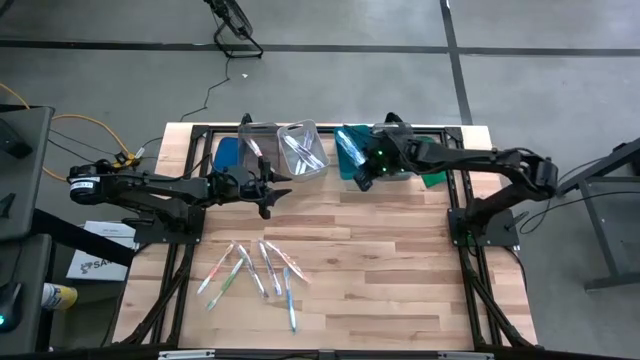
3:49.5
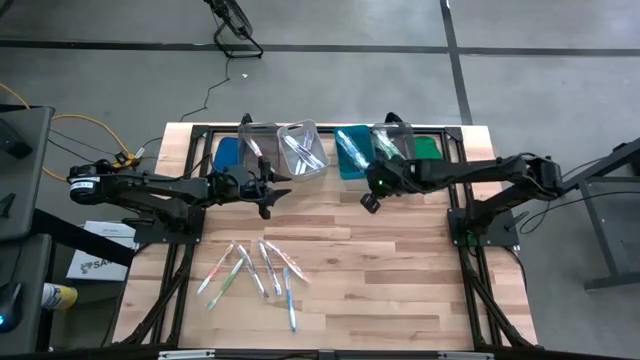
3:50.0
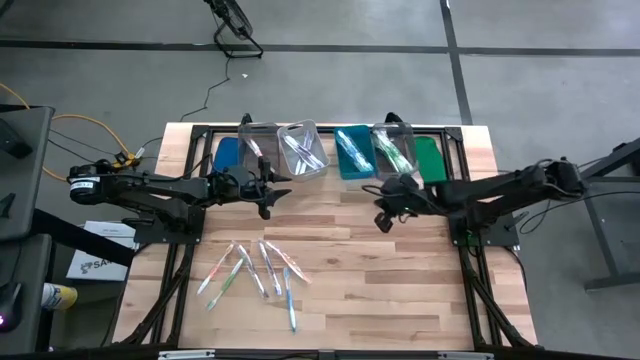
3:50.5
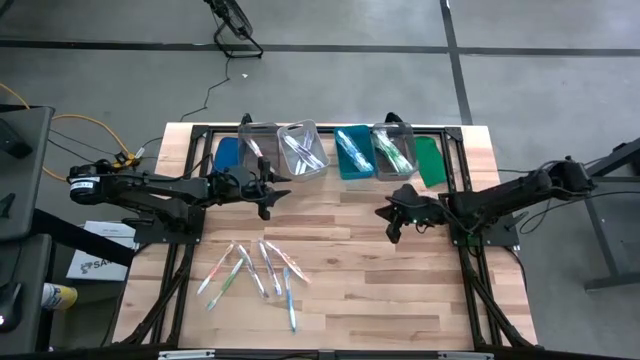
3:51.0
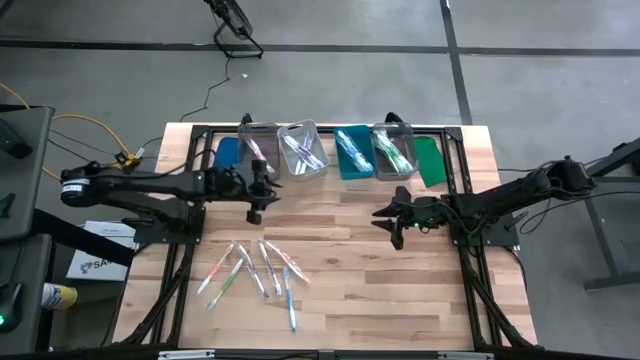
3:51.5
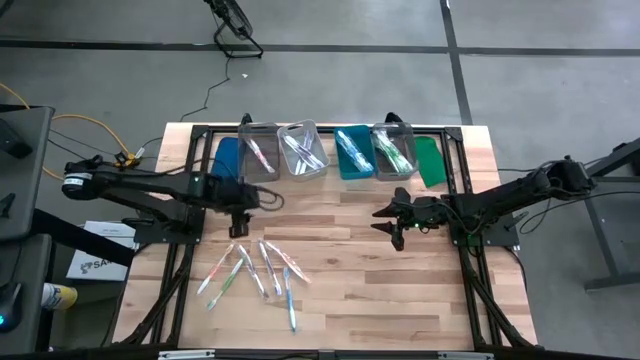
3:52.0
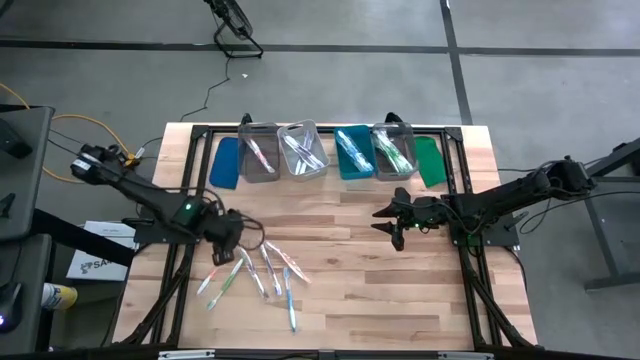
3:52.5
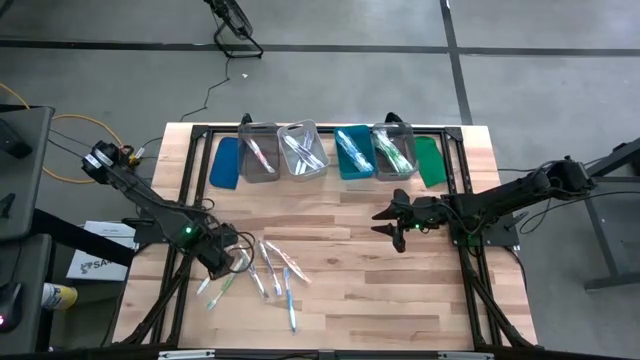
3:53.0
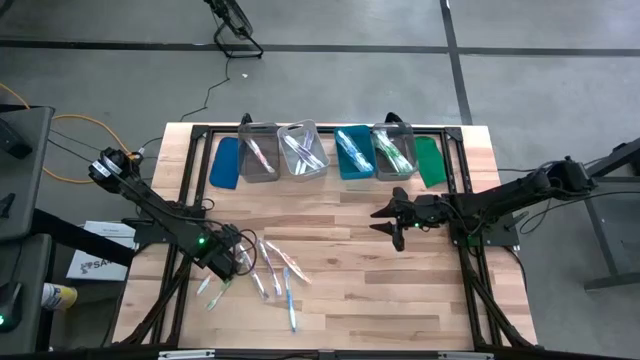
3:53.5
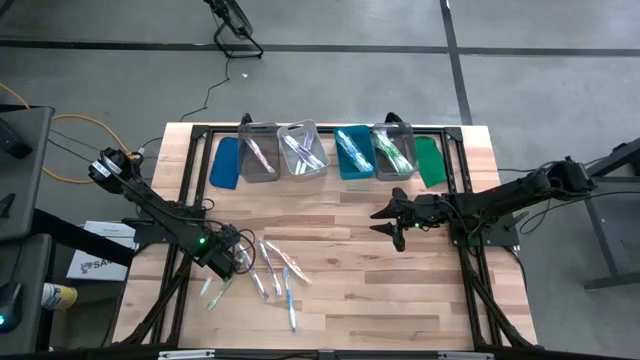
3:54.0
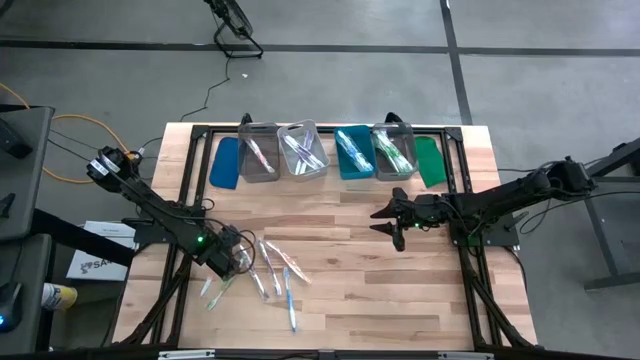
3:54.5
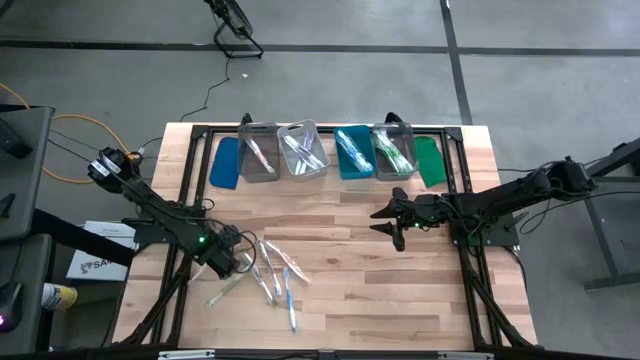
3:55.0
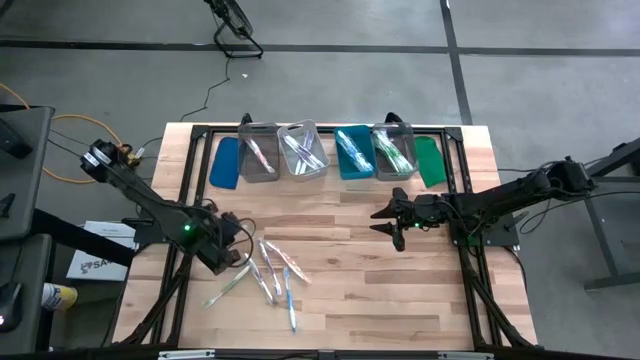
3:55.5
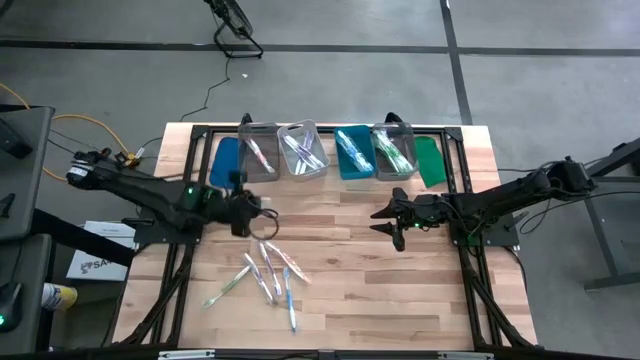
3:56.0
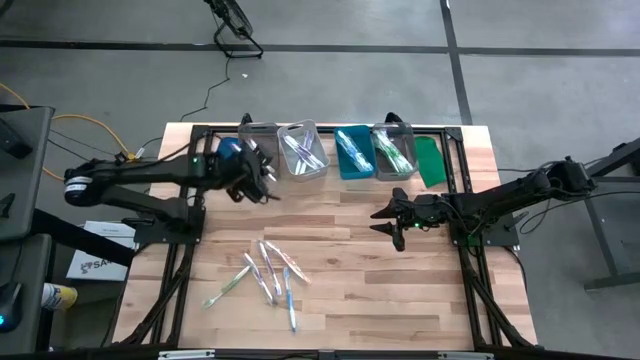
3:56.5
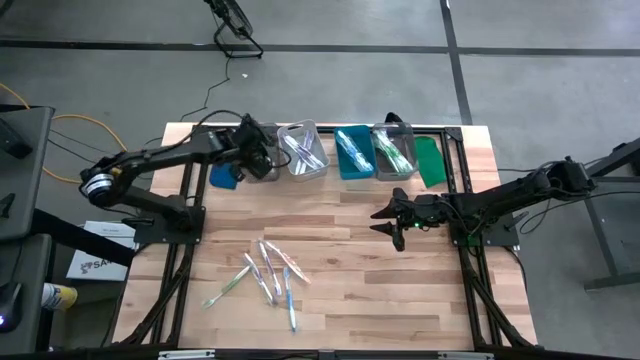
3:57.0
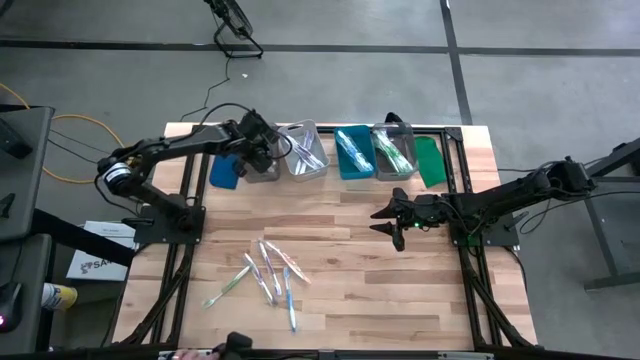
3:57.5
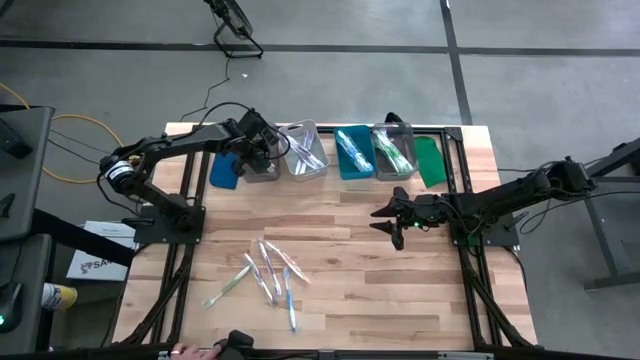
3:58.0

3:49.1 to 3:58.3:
Task: Pick & Place Toothbrushes
Put the orange toothbrush into the left black bin

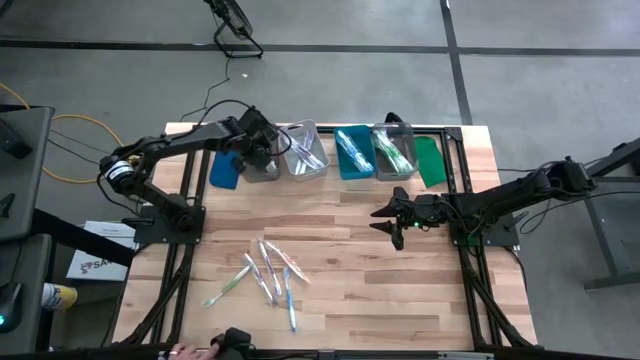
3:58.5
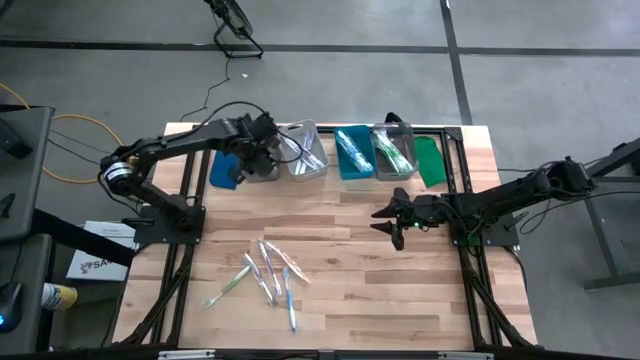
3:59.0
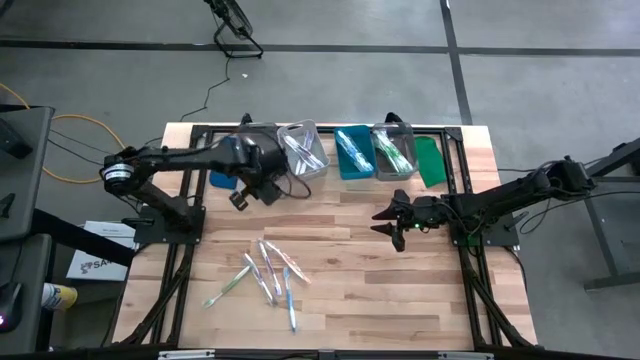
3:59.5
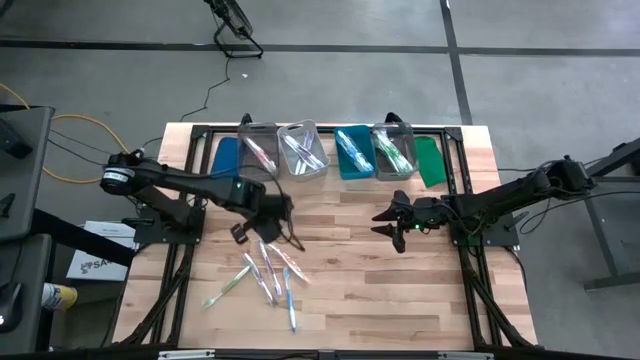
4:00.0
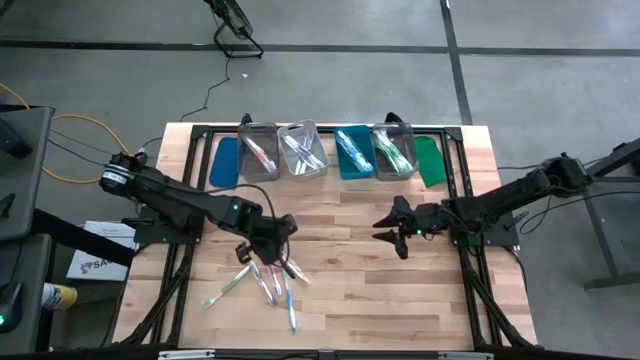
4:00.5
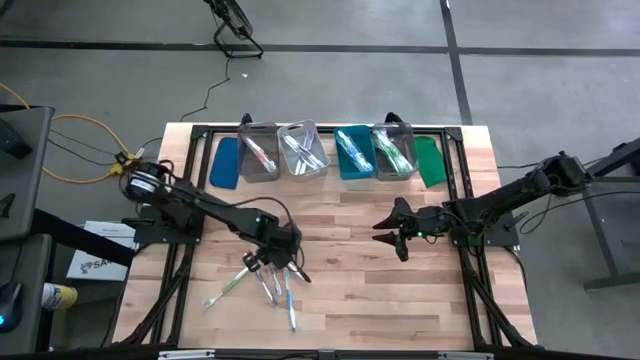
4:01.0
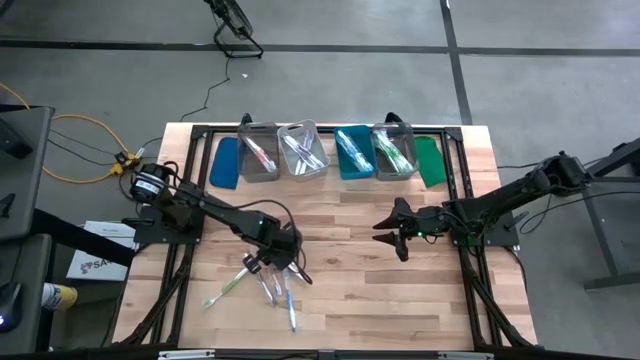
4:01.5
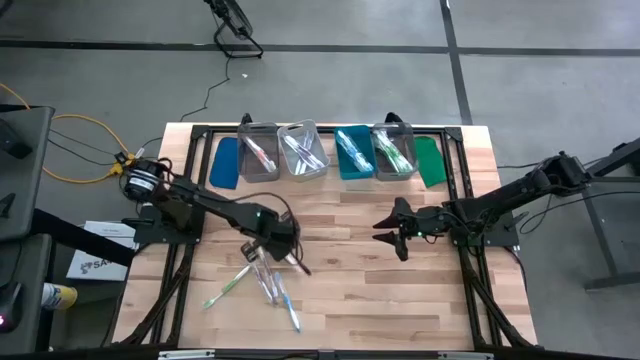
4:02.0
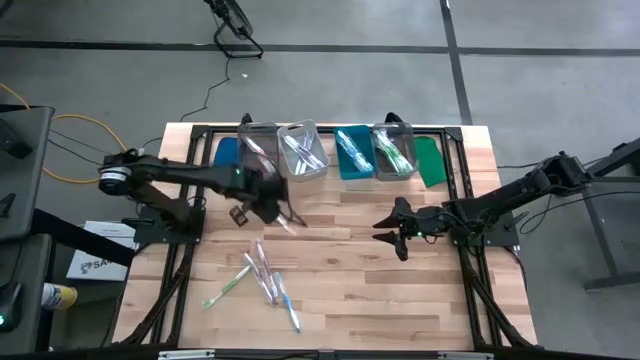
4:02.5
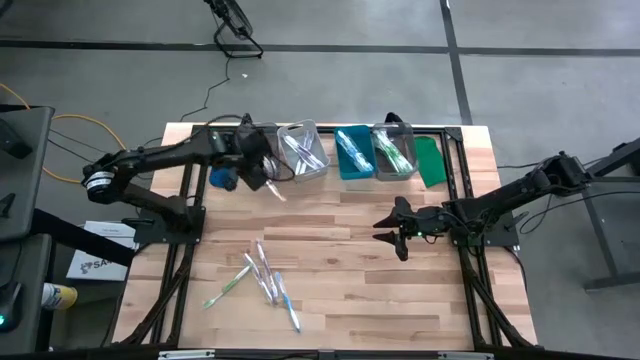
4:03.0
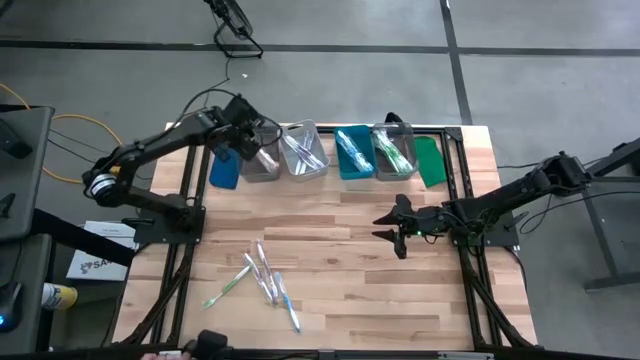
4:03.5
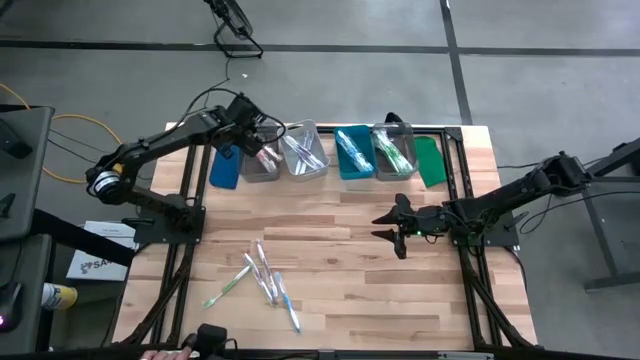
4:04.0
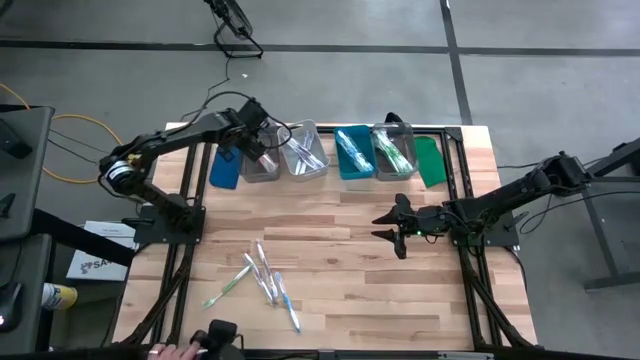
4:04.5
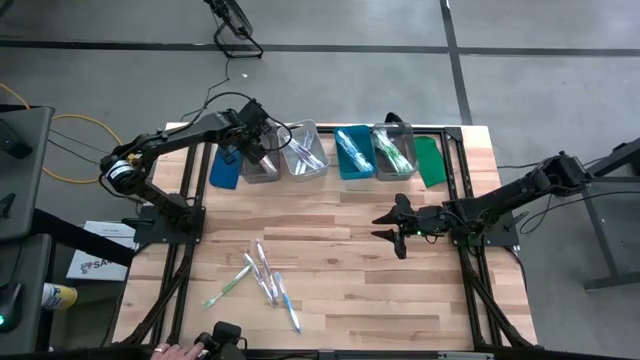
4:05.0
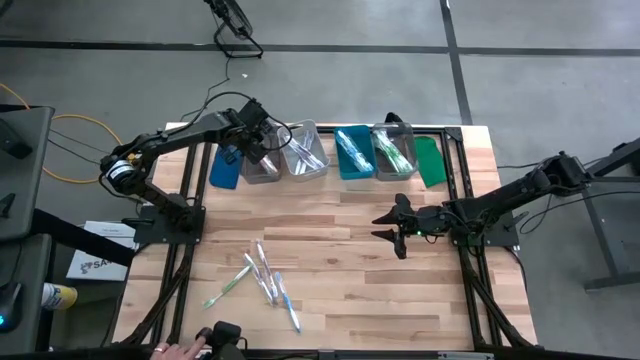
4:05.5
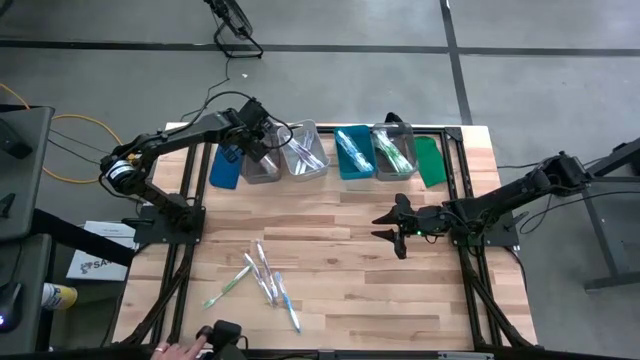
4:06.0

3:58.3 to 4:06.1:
Put the orange toothbrush into the left black bin

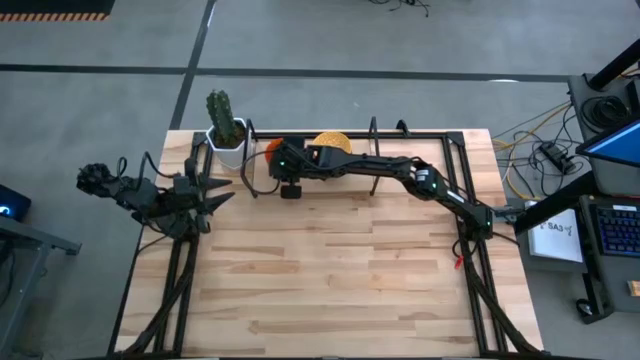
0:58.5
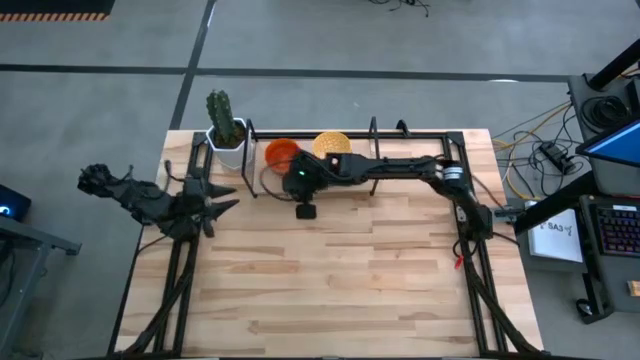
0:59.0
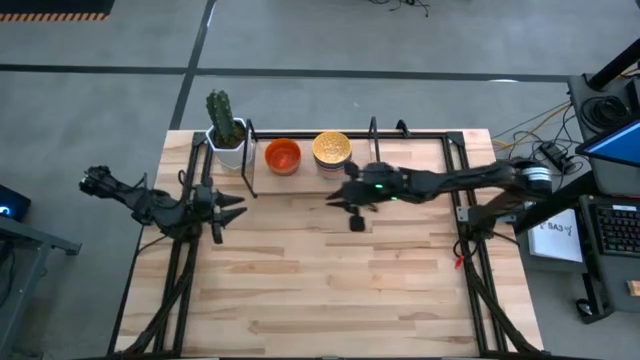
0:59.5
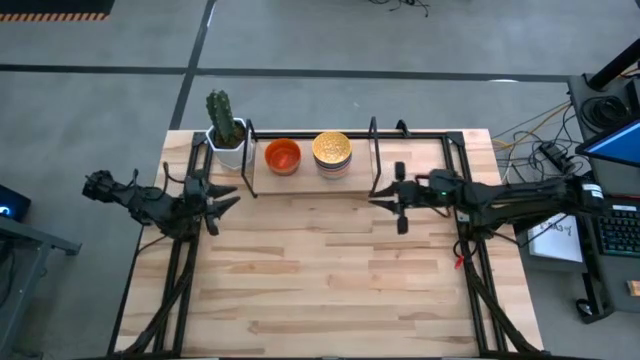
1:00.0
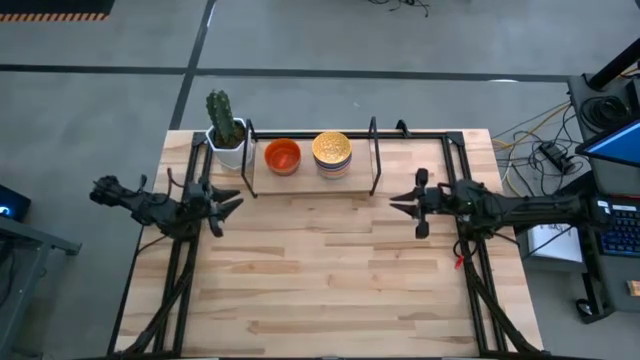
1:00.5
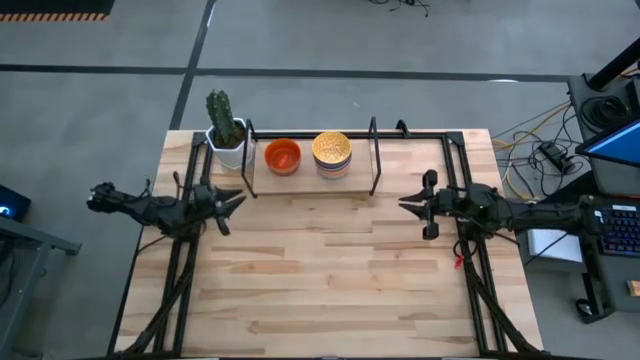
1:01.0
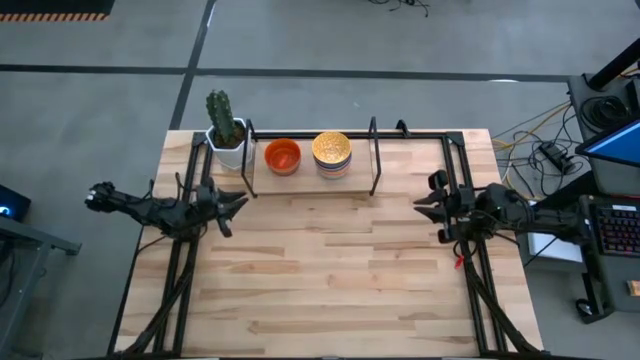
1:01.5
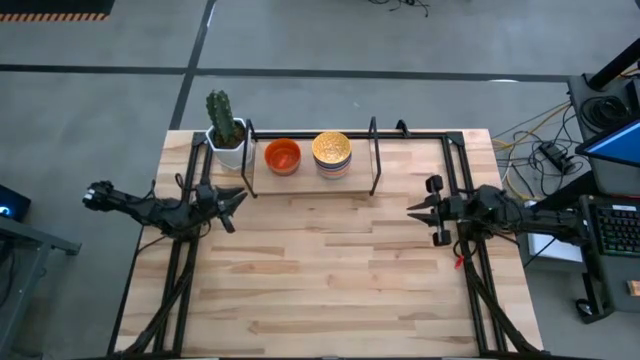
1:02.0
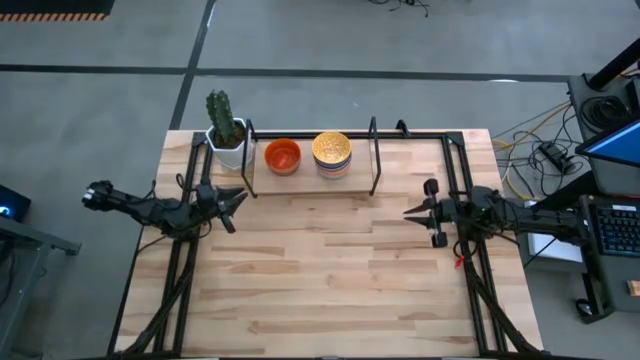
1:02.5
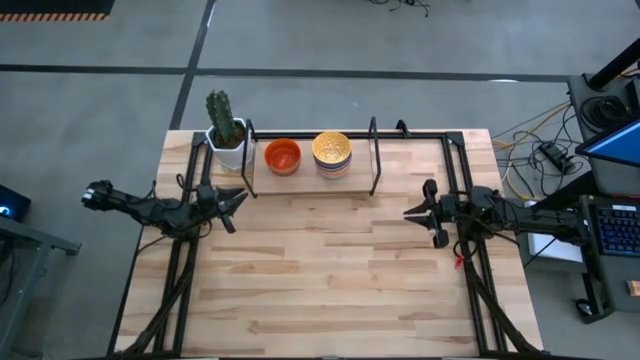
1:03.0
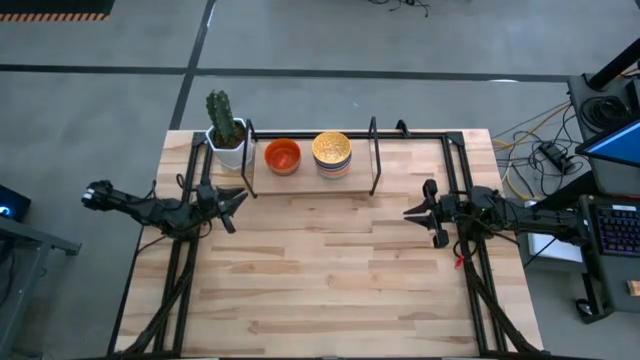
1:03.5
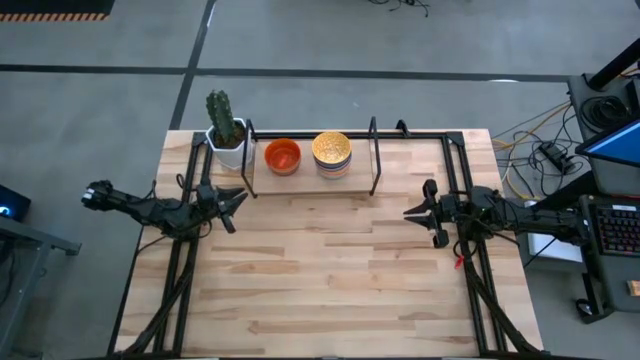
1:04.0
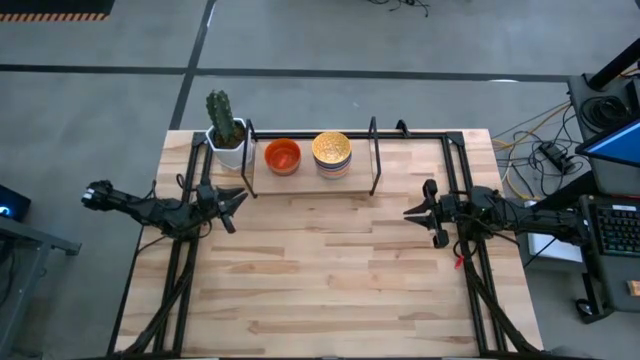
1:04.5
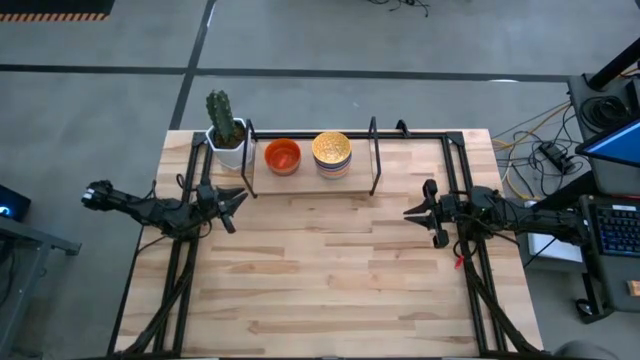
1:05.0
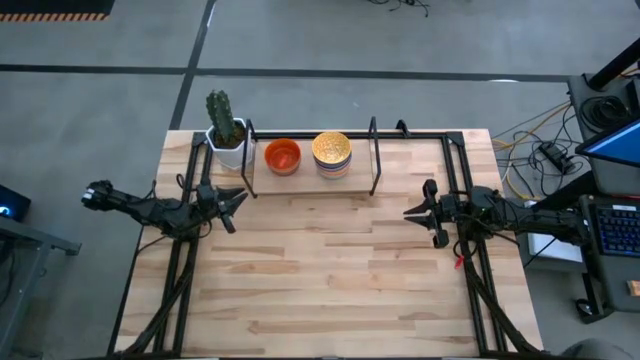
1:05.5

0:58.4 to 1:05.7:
Task: Place and stack bowls onto a shelf
Return to Home Position
